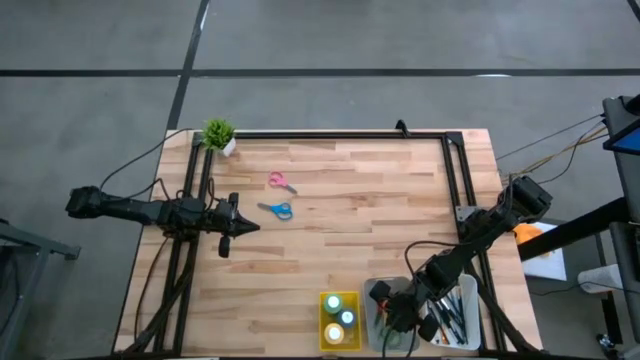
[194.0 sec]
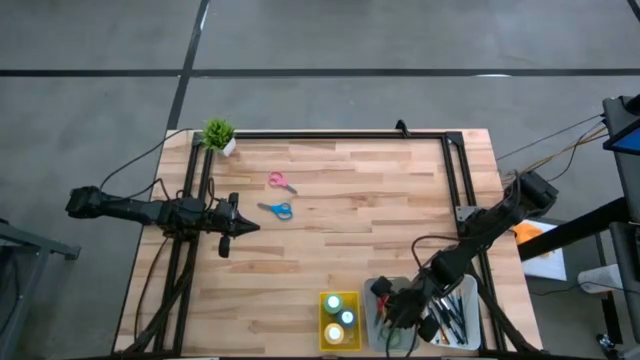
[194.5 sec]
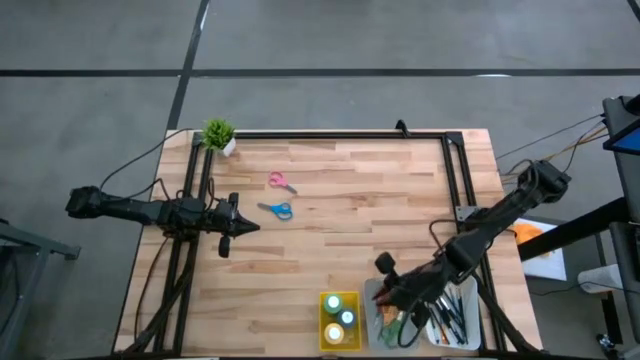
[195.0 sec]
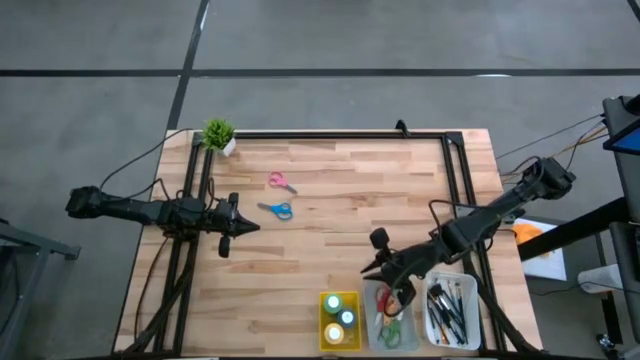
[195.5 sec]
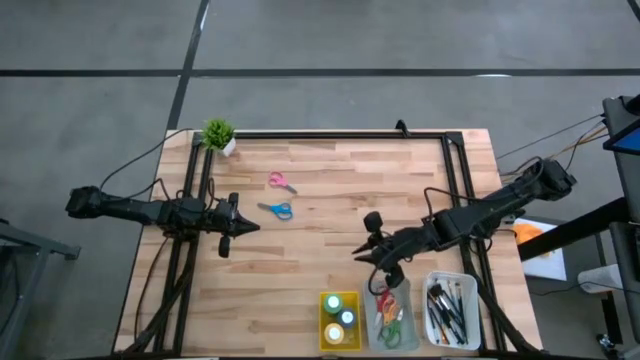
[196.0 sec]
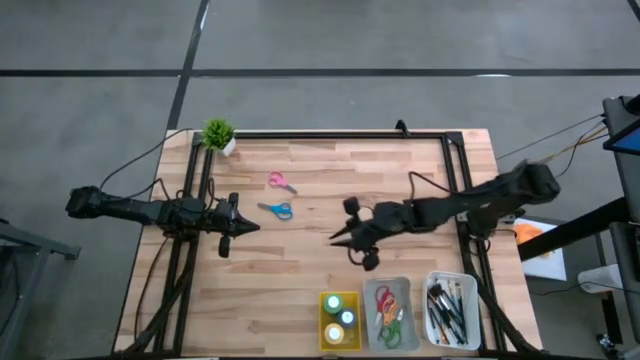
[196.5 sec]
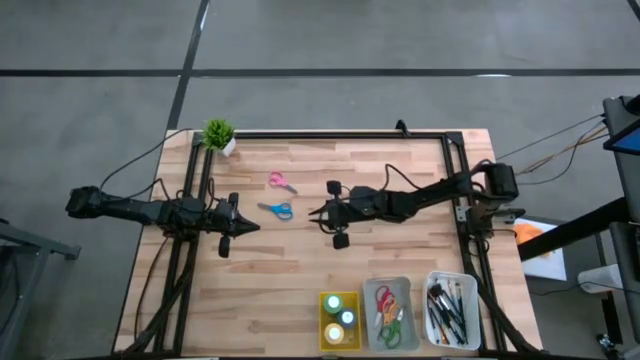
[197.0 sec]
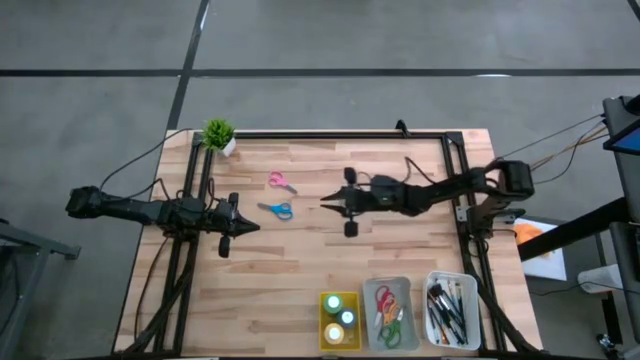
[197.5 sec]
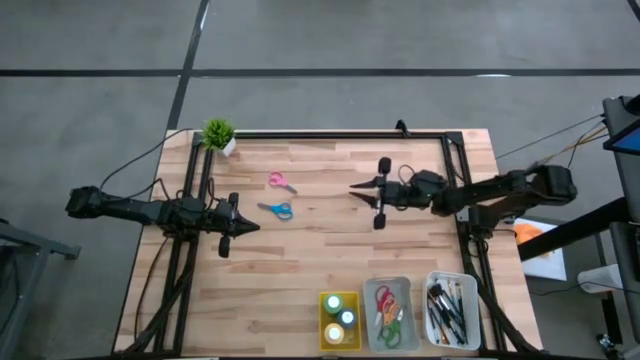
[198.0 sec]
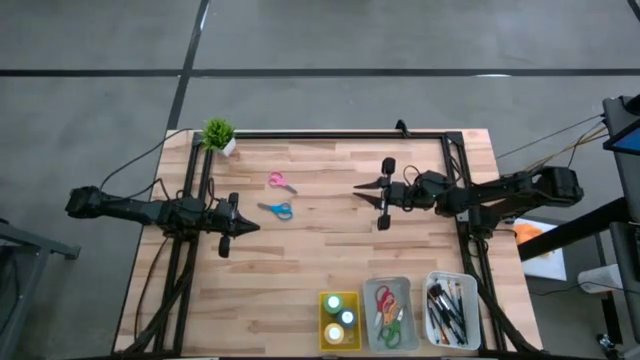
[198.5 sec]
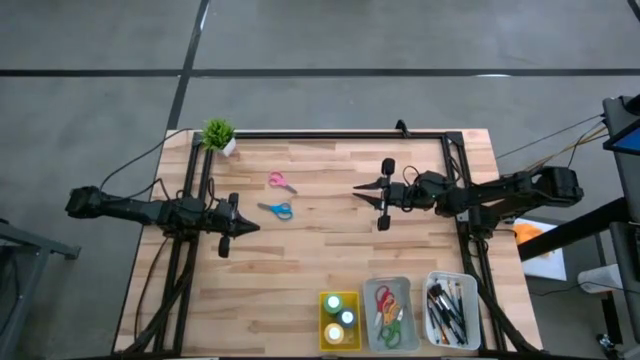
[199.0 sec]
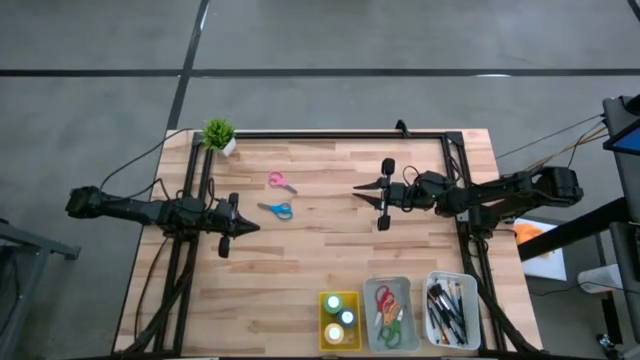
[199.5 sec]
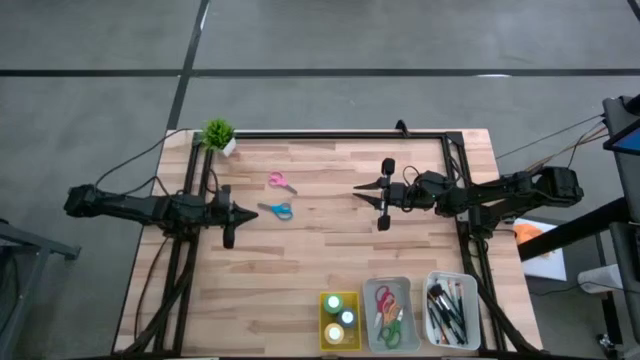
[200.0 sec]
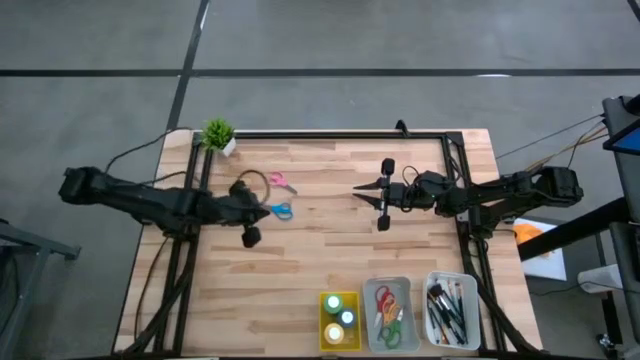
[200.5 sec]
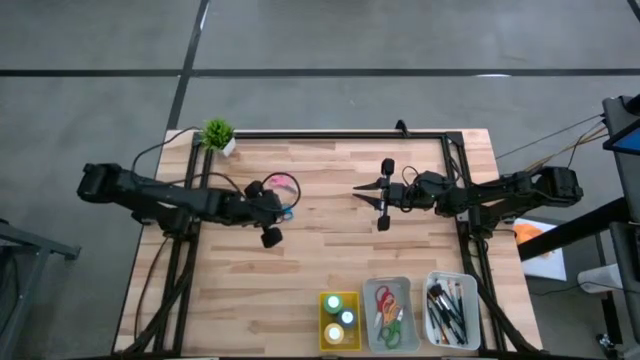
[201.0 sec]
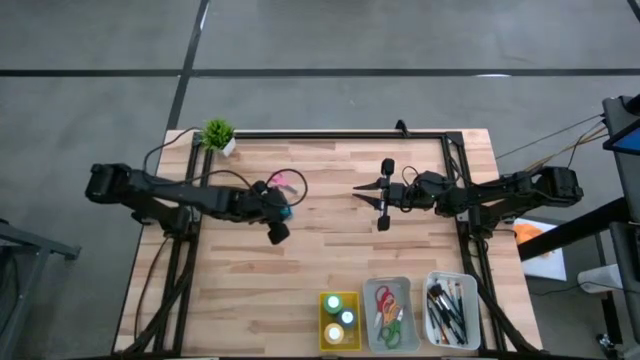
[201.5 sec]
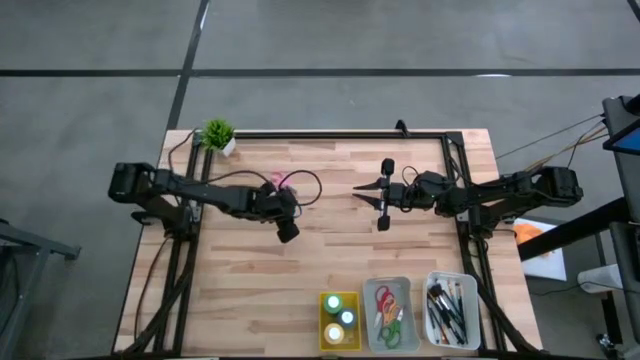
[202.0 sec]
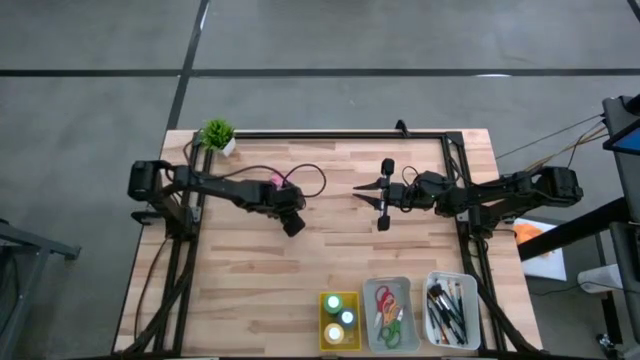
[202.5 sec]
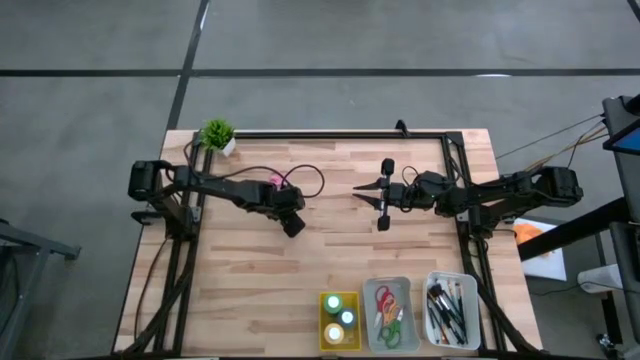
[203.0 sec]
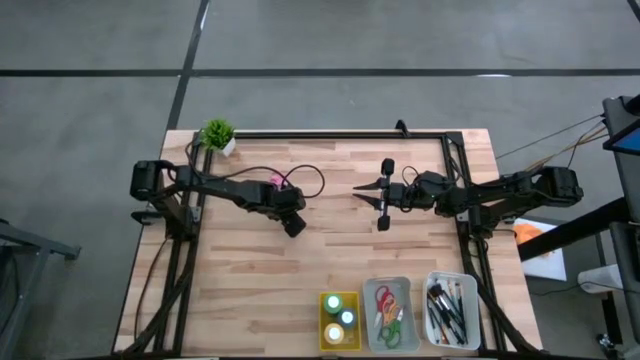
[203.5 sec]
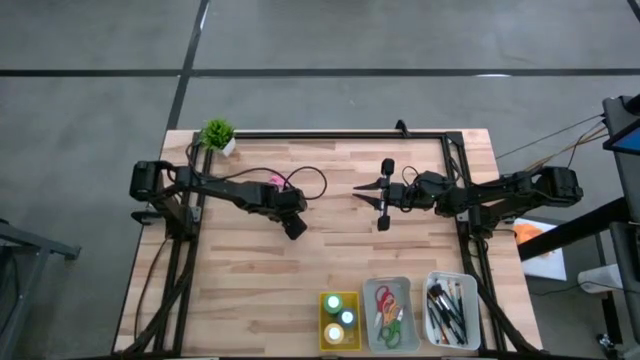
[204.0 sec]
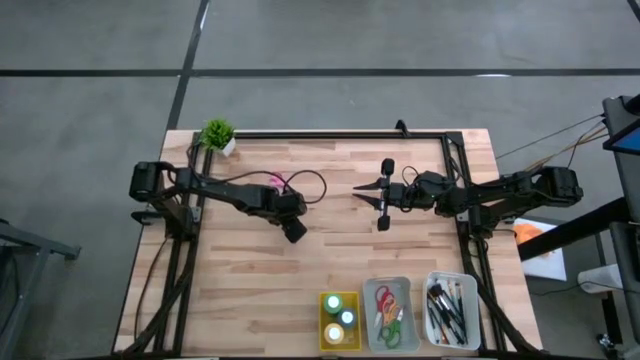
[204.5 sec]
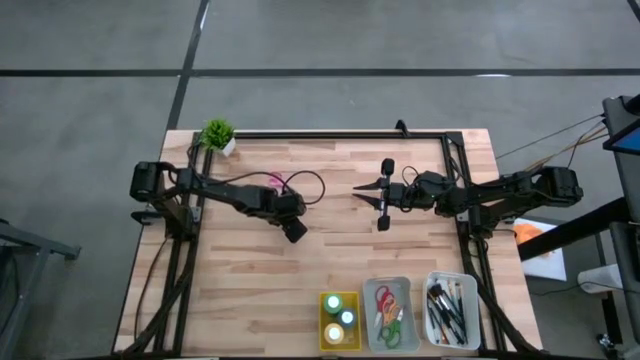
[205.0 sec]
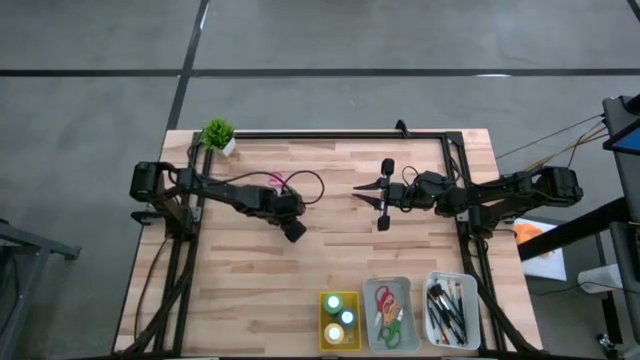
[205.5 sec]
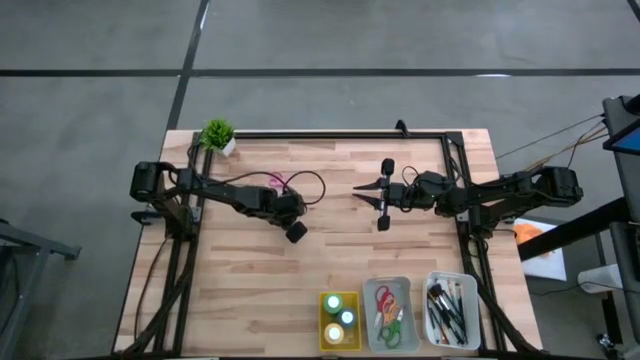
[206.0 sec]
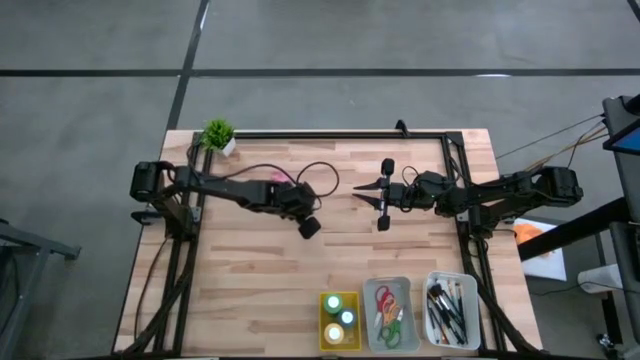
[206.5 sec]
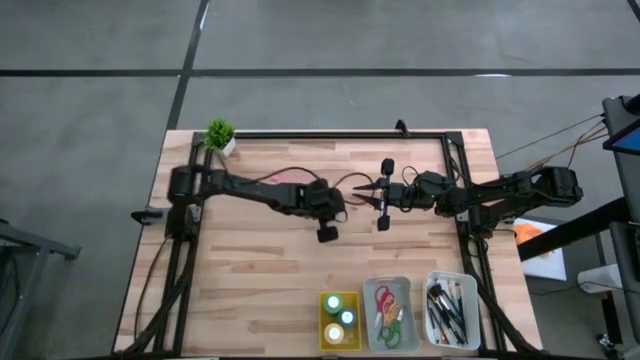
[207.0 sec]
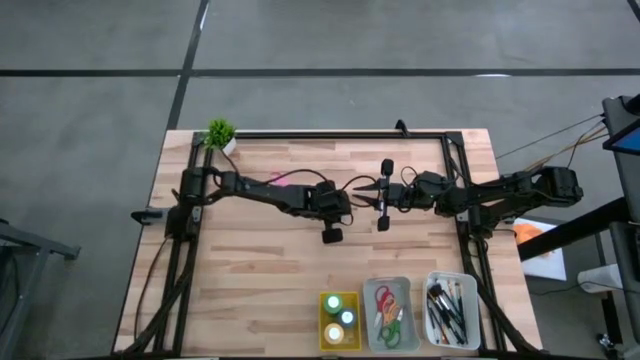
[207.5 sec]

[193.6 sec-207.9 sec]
Task: Pick & Place Paint Supplies
Put the blue scissors into the gray bin

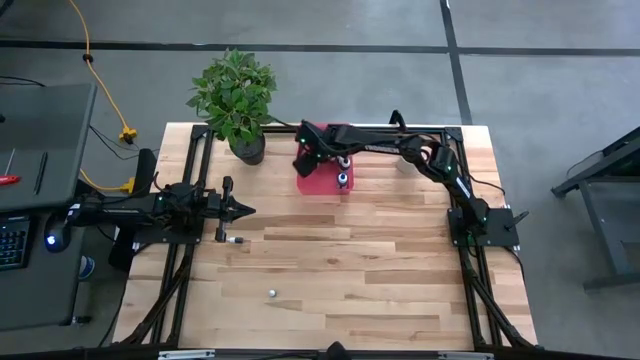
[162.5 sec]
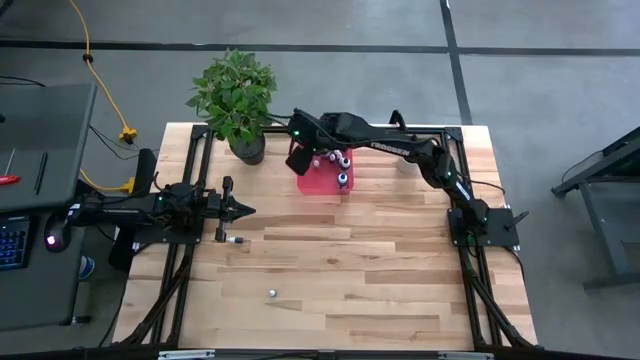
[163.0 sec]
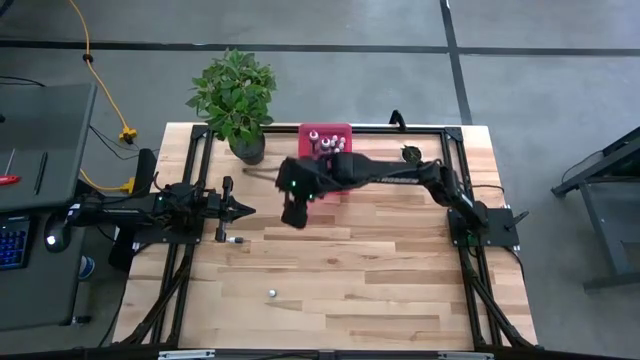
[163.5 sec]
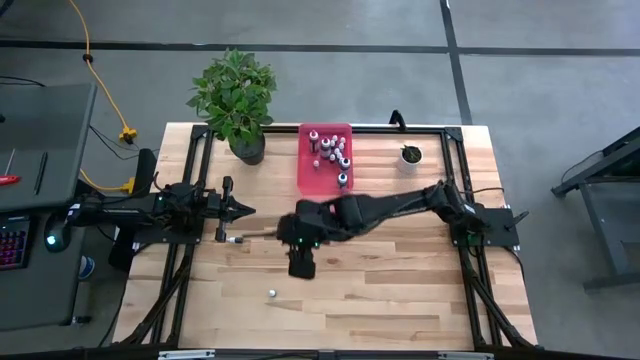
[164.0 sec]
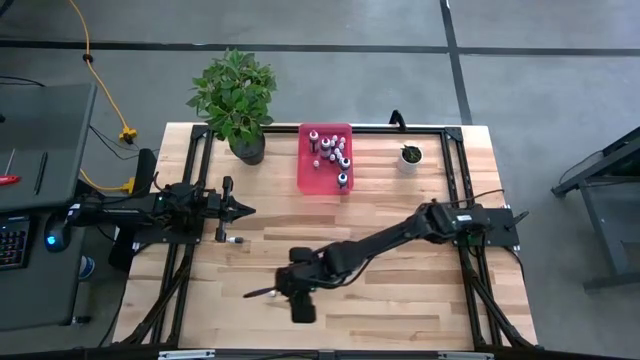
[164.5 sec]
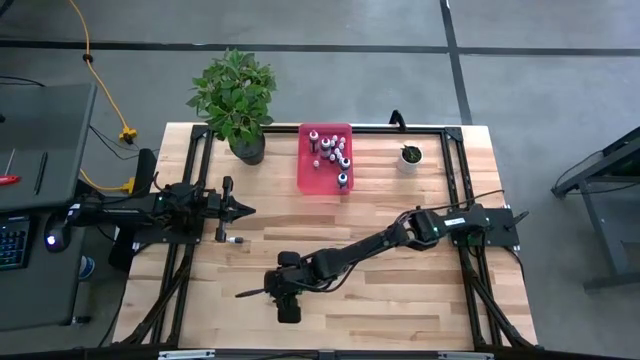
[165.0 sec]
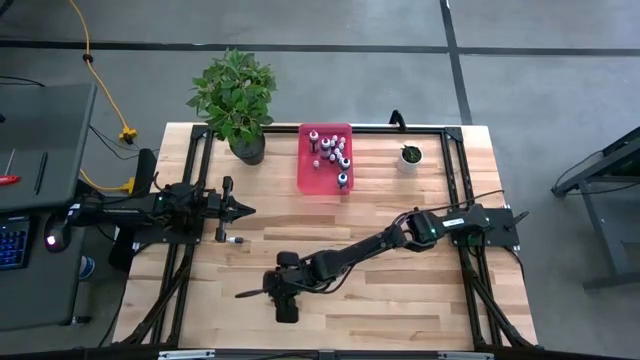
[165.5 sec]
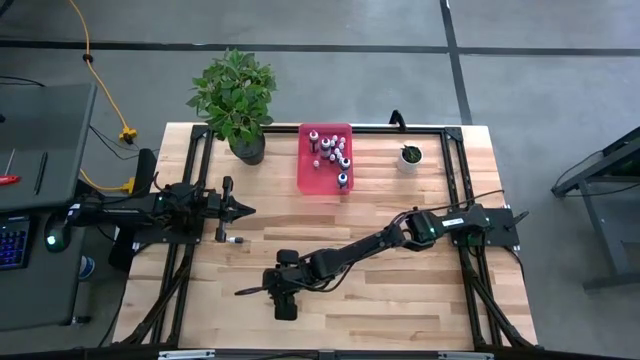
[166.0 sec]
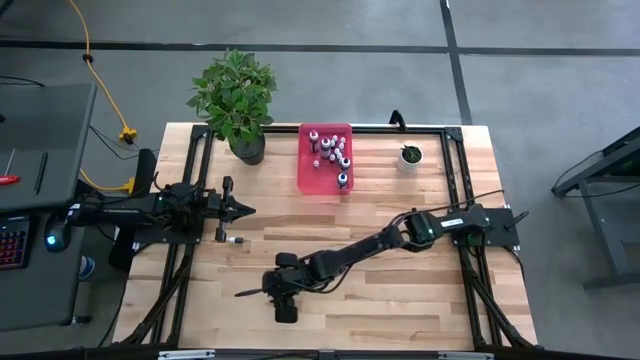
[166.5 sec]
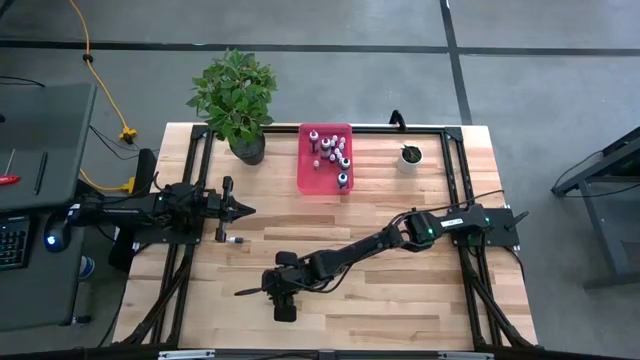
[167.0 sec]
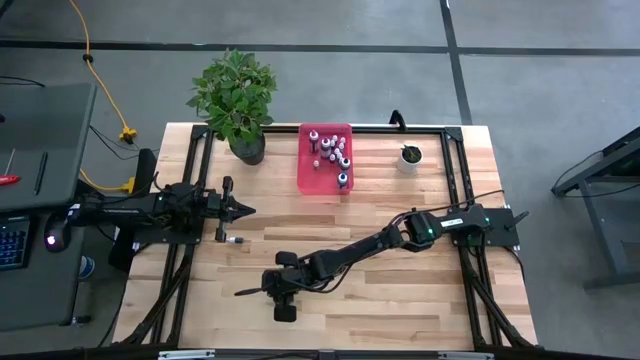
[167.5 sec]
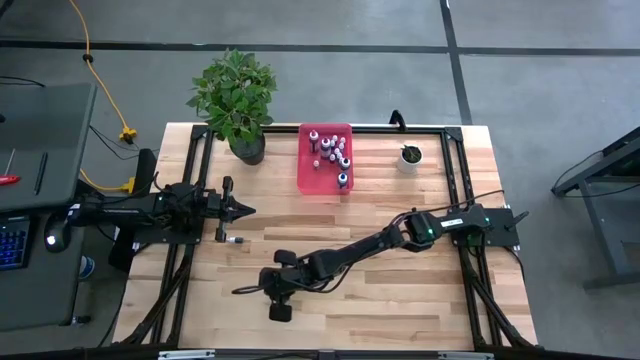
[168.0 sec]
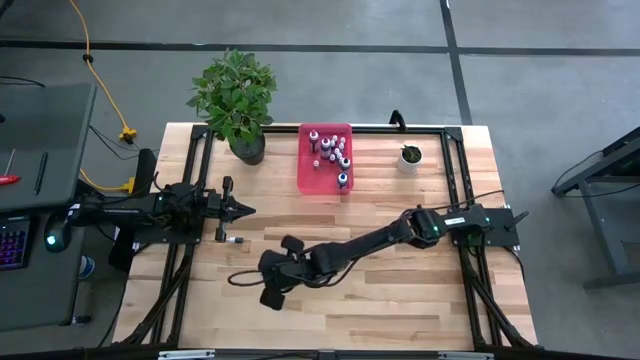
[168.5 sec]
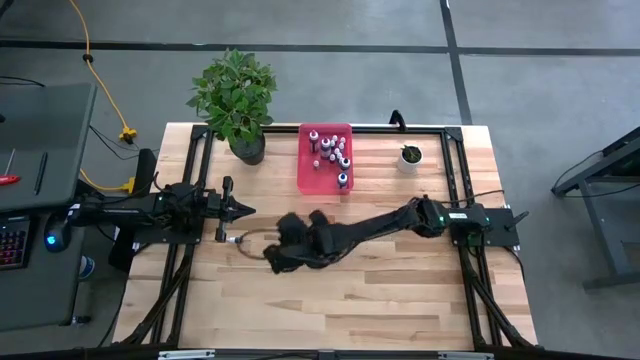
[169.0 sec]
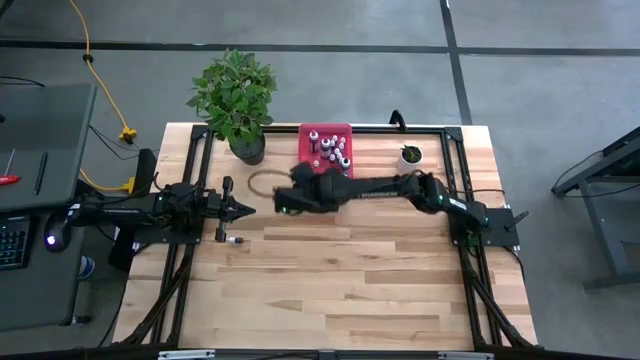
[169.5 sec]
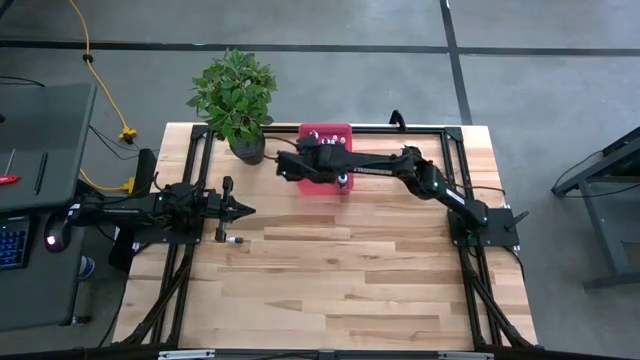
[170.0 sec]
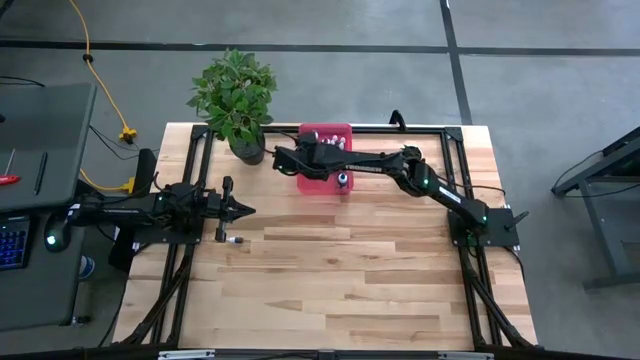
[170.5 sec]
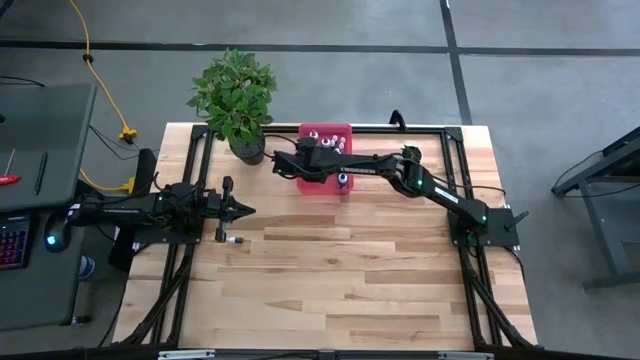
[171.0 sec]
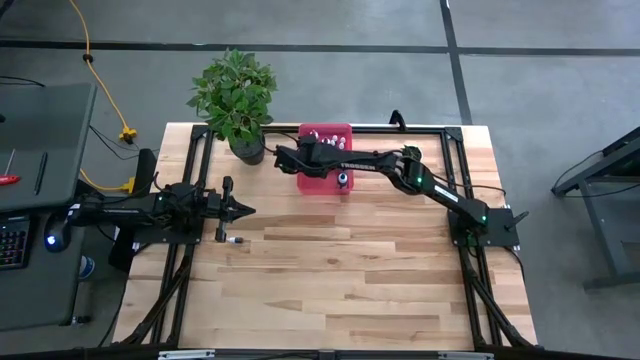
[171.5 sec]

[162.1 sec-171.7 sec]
Task: Pick & Place food coloring
Put the red food coloring bottle into the pink bin
